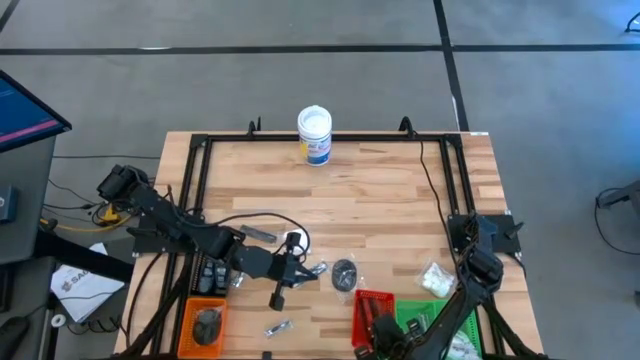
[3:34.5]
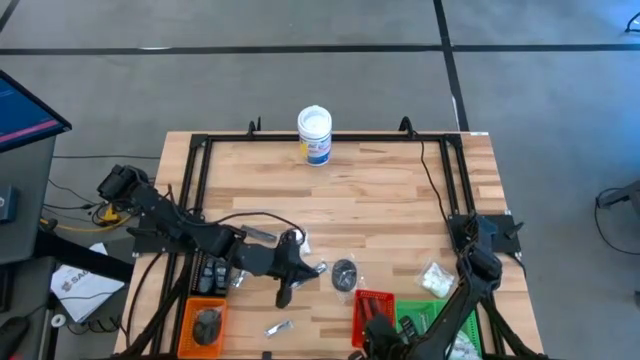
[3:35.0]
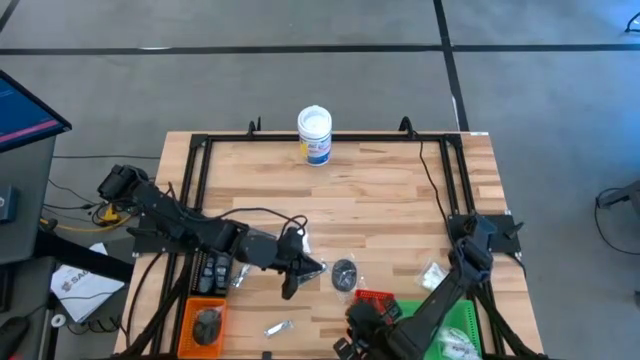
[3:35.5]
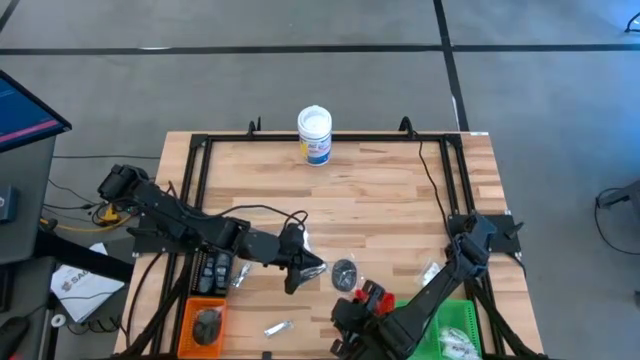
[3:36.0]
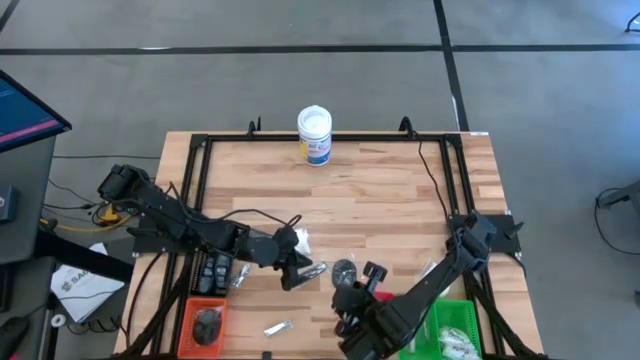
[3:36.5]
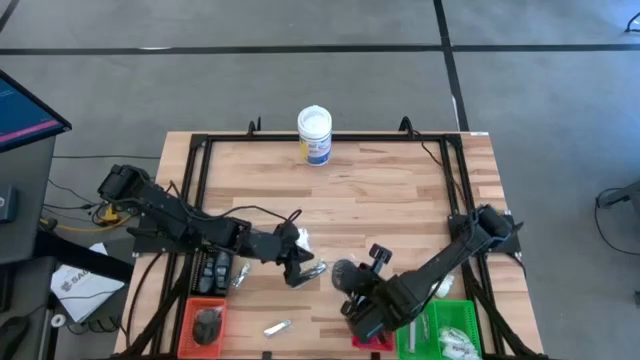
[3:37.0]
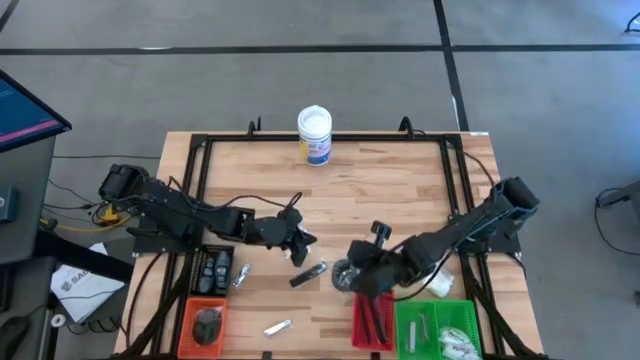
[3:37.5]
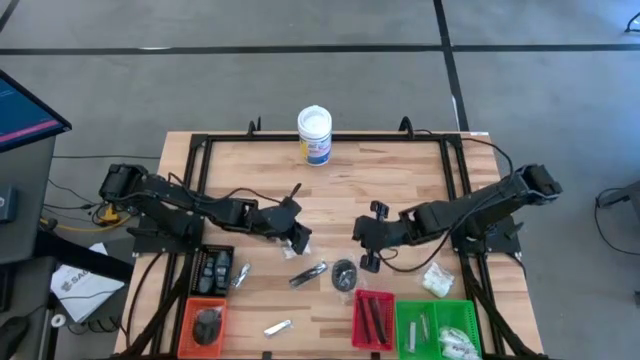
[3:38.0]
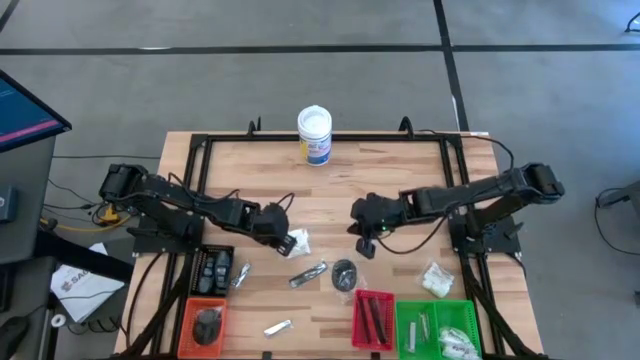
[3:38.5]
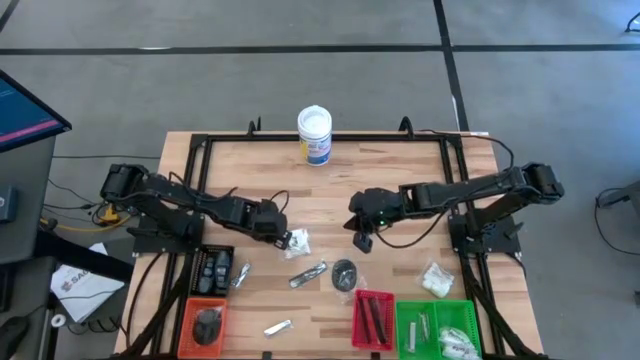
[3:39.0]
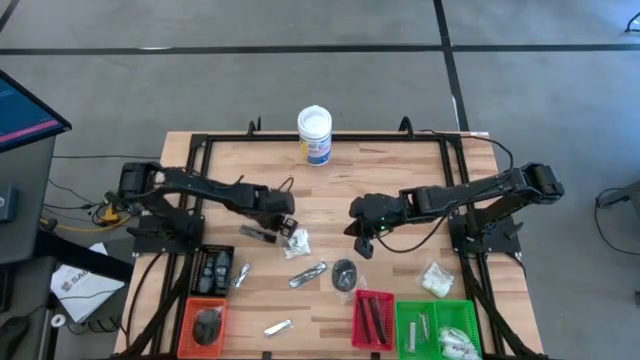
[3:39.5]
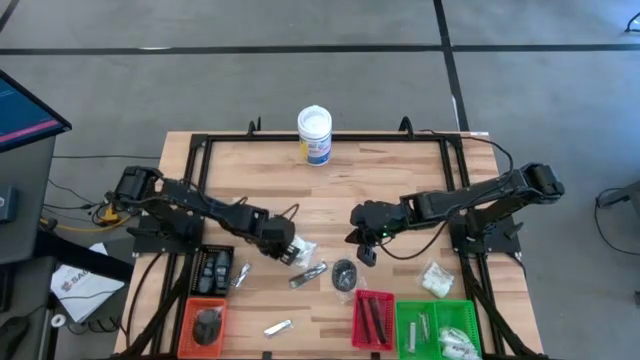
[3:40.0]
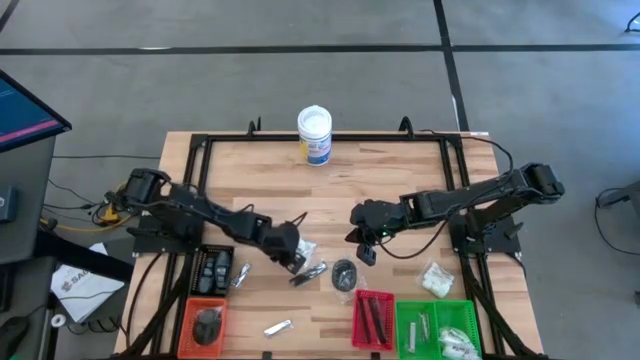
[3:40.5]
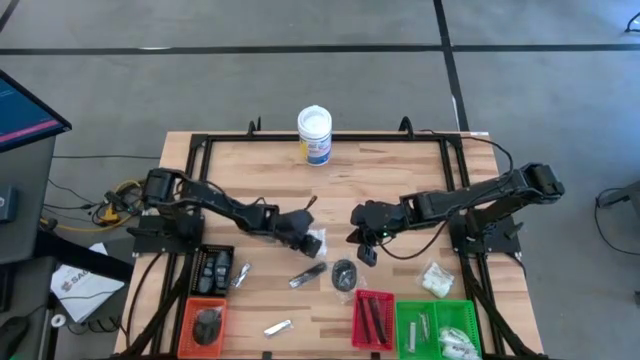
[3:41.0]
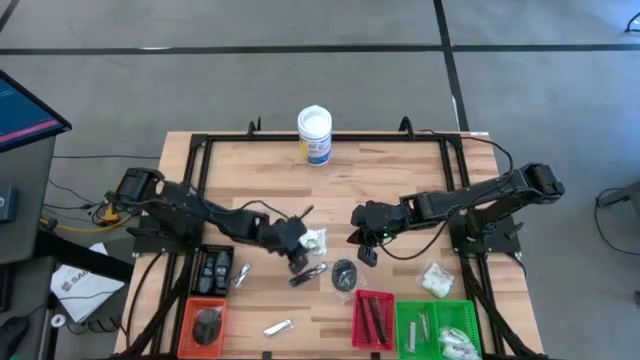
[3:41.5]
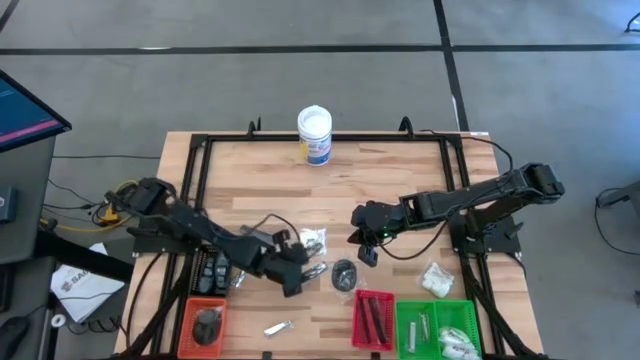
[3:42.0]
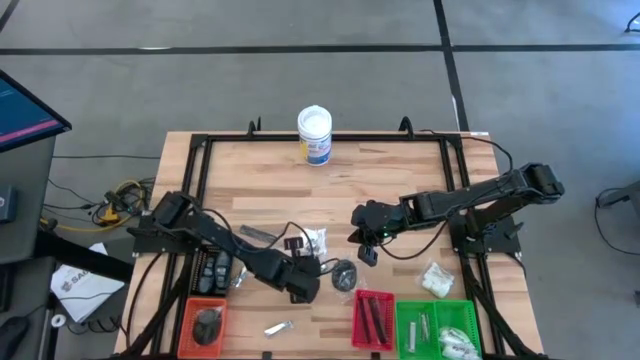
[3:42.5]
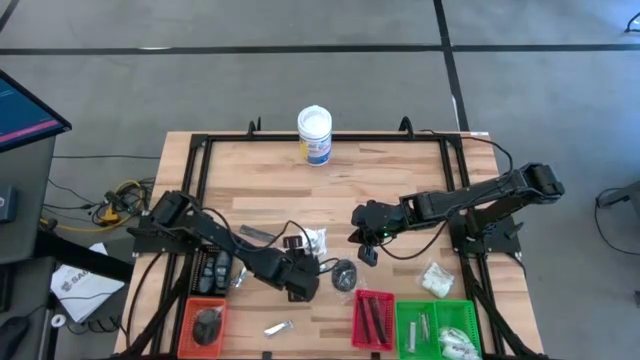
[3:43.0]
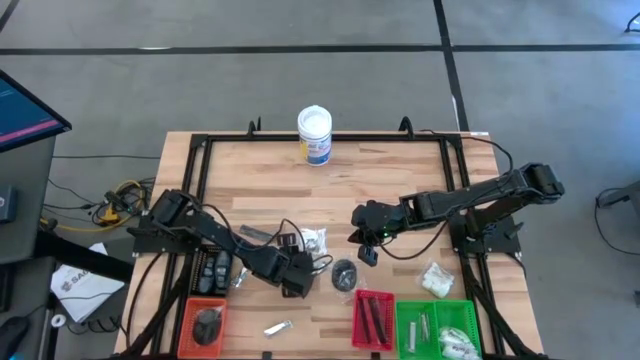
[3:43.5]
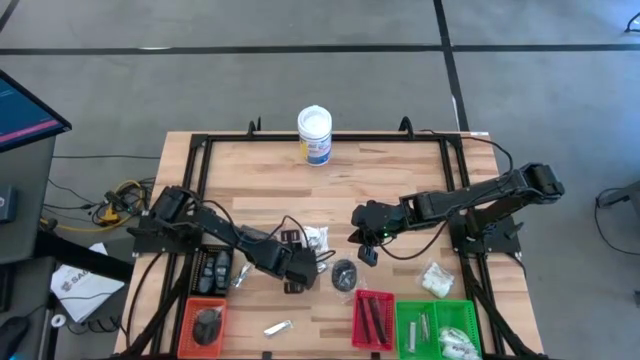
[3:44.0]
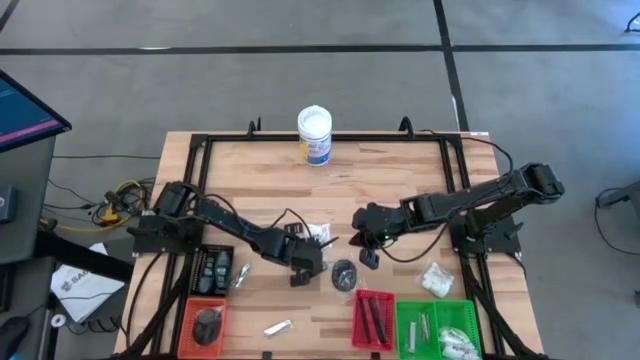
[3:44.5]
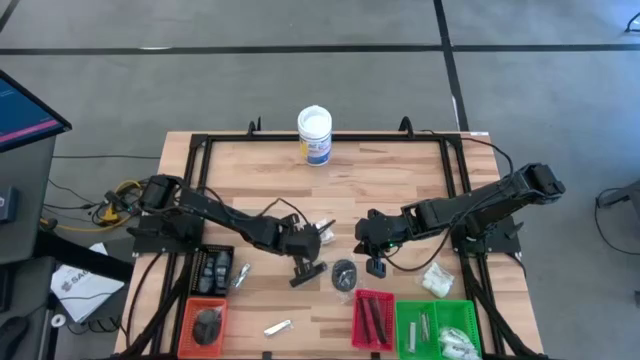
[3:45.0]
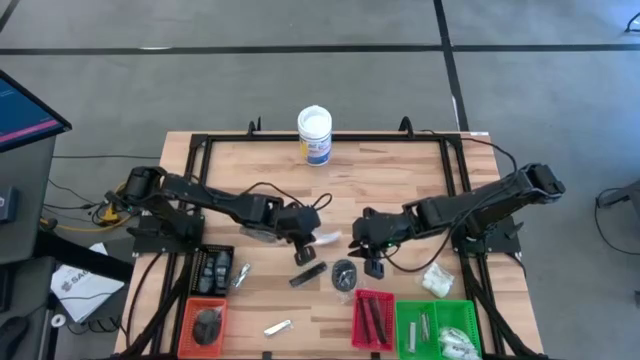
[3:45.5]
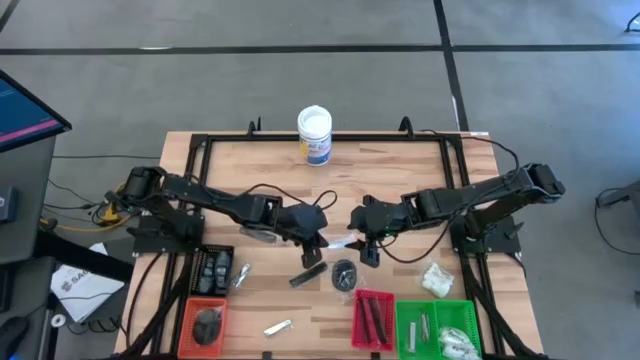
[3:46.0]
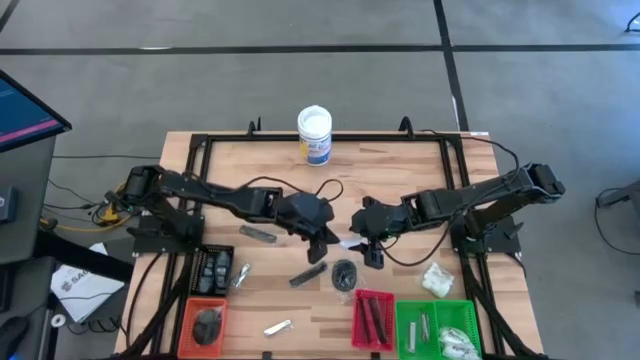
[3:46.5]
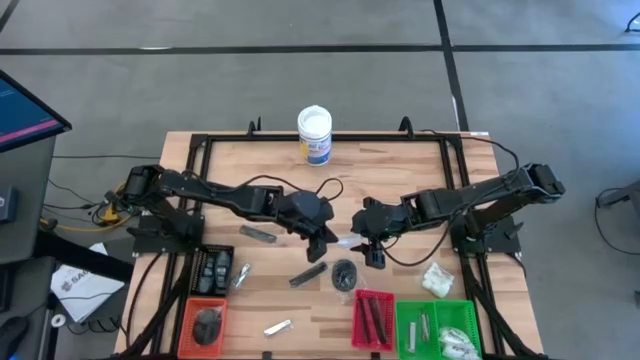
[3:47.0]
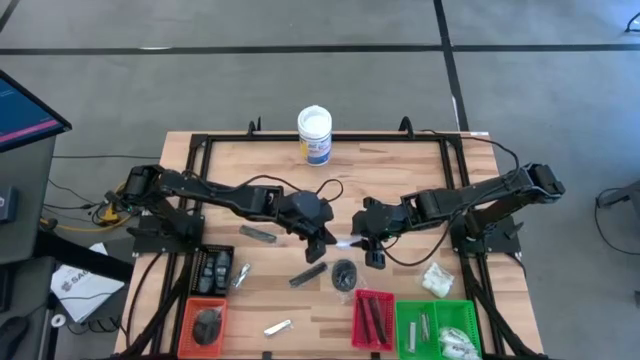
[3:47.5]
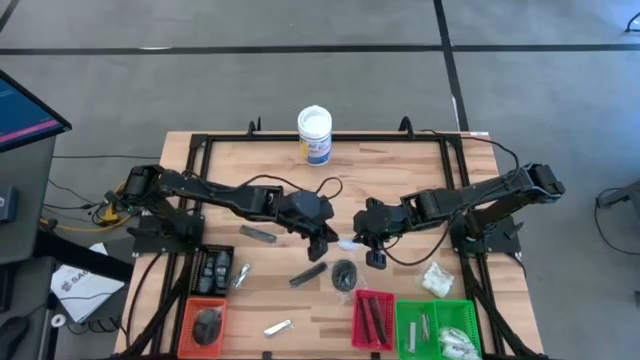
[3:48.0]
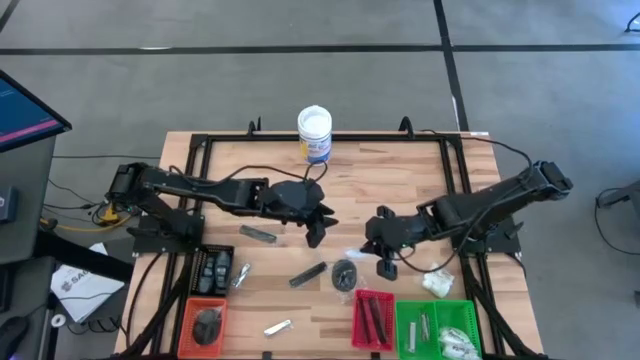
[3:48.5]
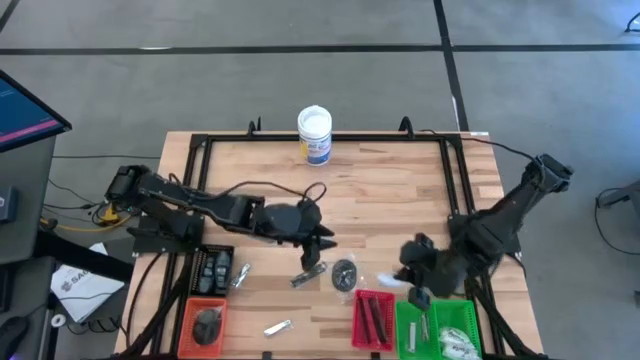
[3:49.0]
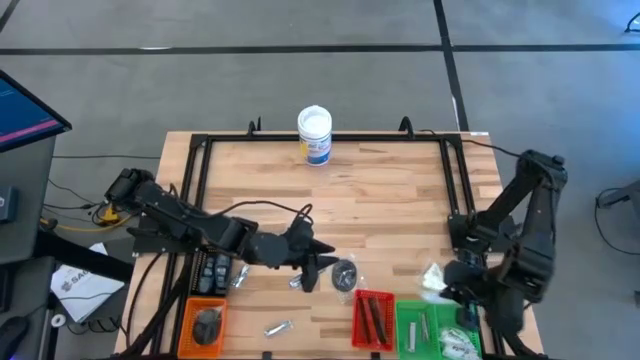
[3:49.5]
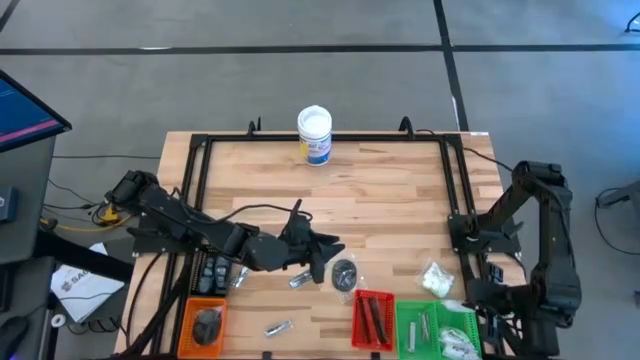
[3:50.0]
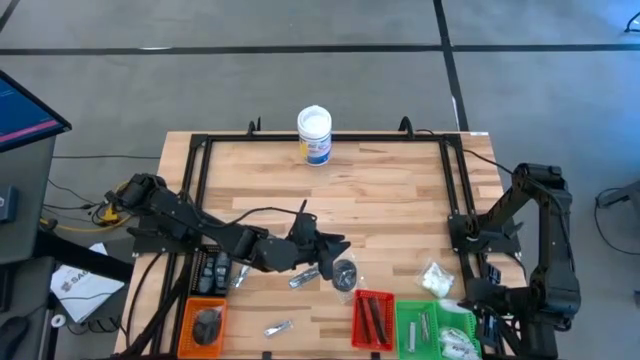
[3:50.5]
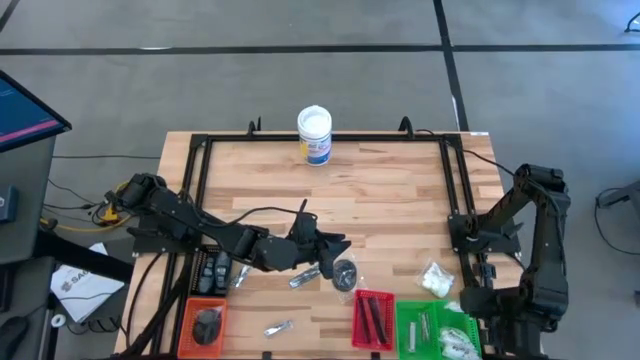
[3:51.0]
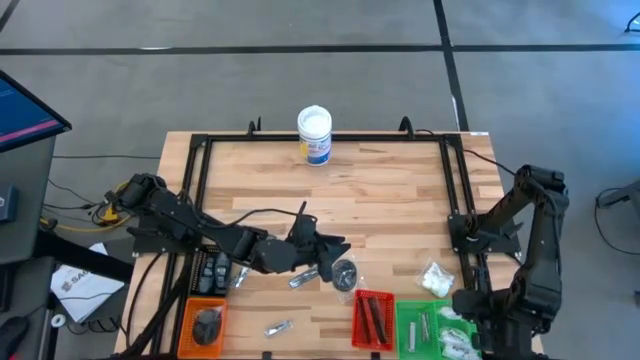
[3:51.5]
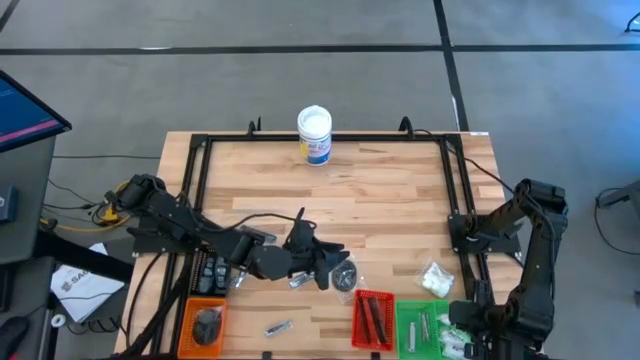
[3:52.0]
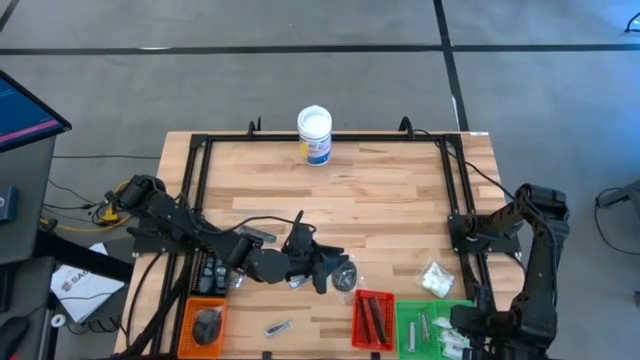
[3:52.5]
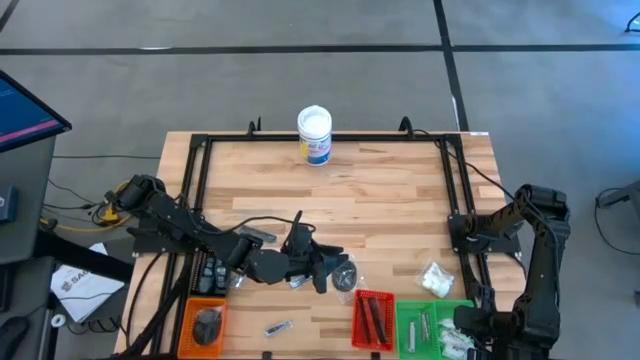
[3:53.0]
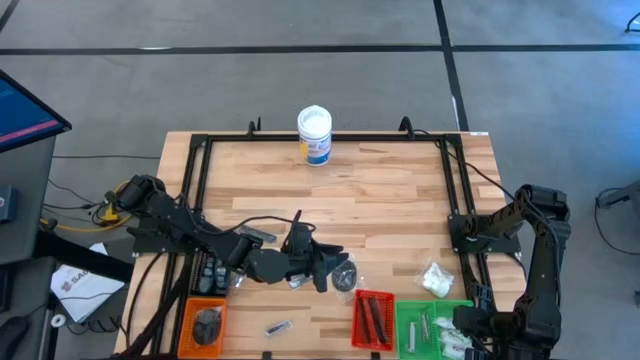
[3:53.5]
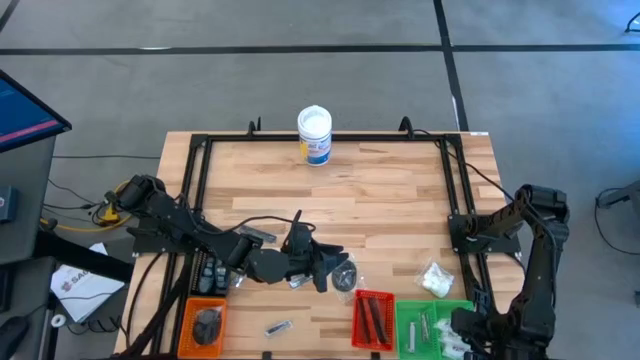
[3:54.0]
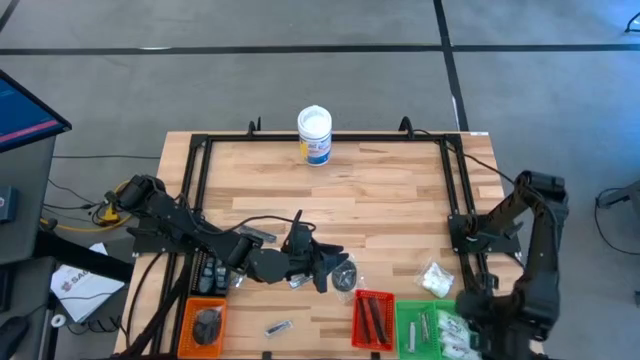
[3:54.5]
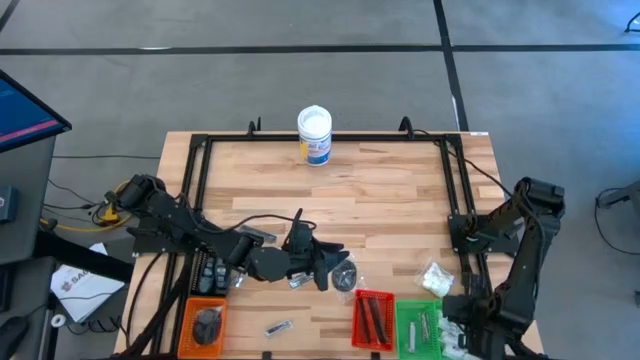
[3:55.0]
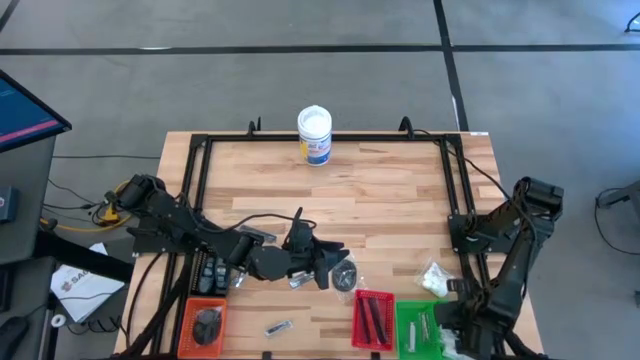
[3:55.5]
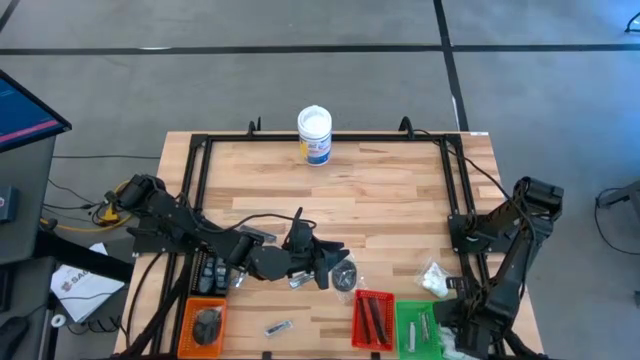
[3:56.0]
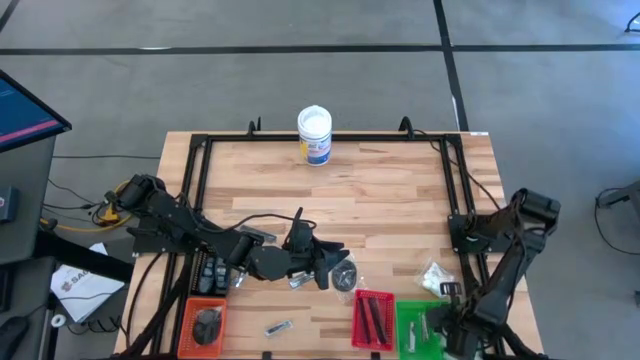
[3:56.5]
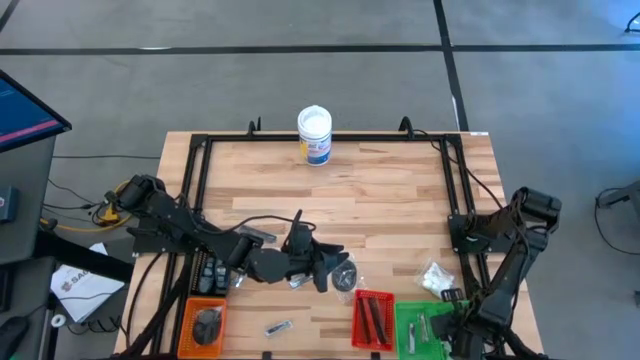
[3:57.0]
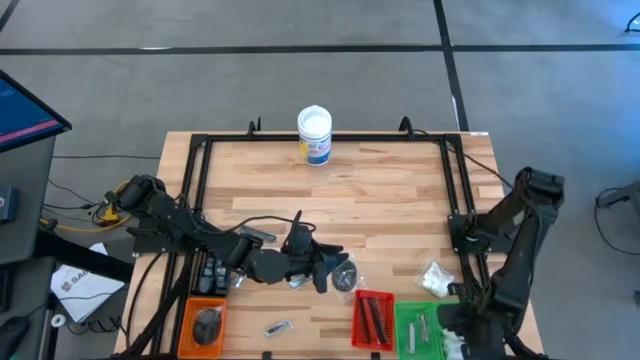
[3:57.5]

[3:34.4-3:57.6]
Task: Pick & Place Travel size toiletries
Put the white cotton pack into the right green bin
